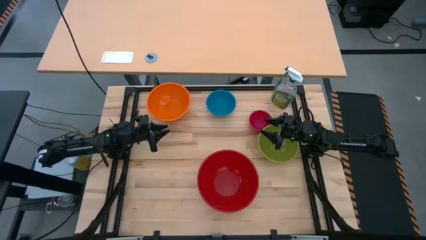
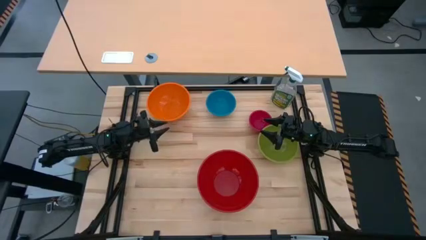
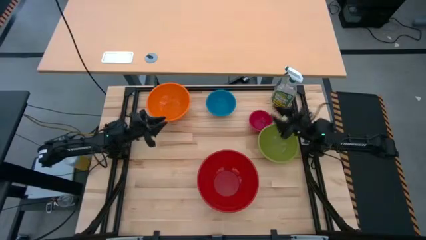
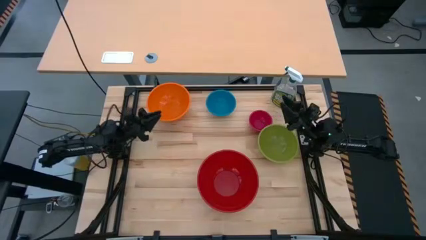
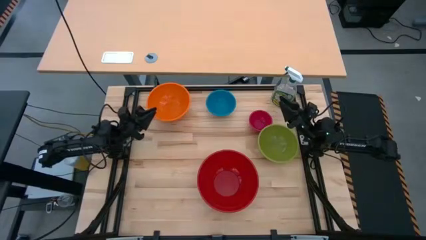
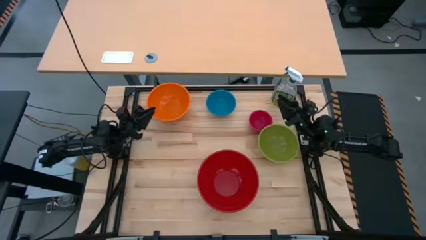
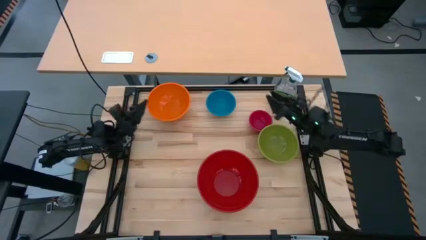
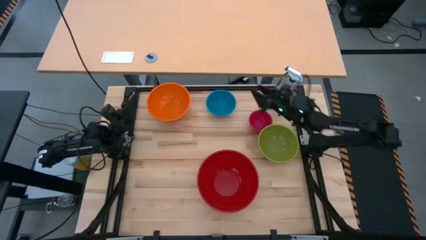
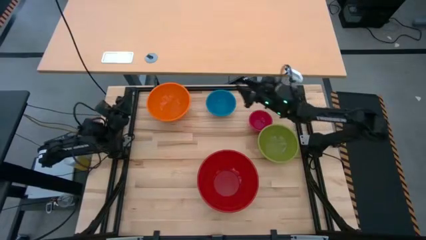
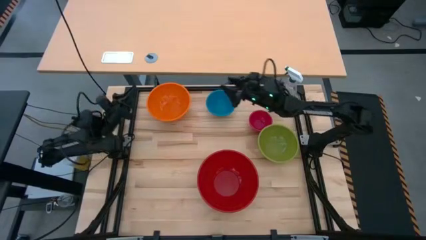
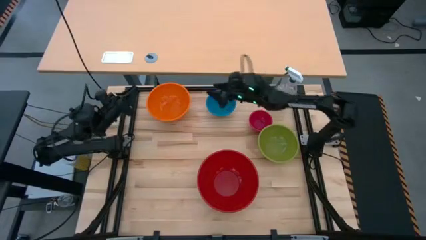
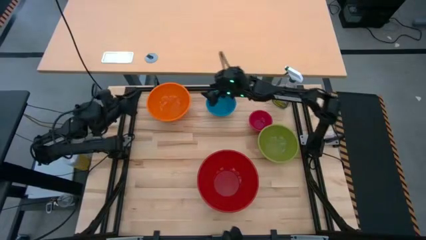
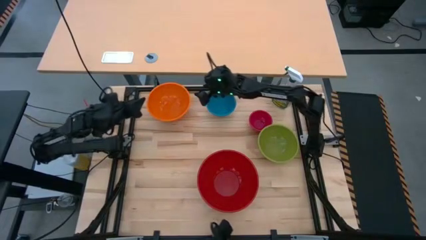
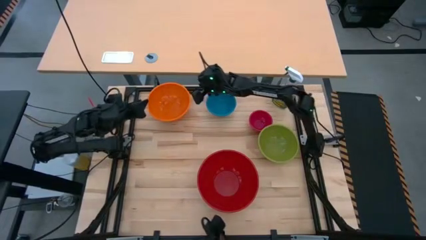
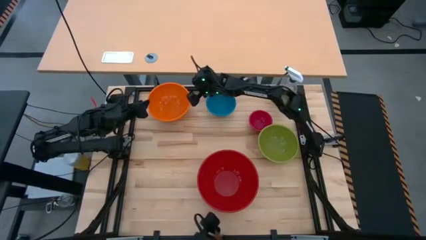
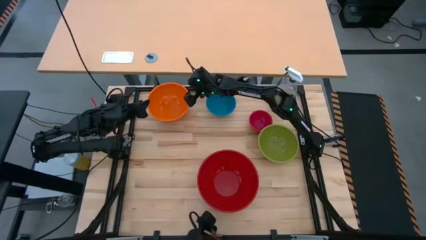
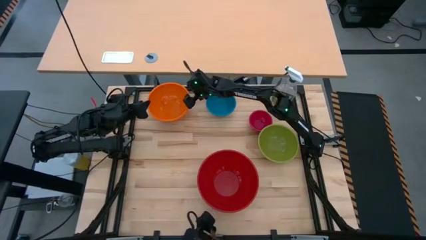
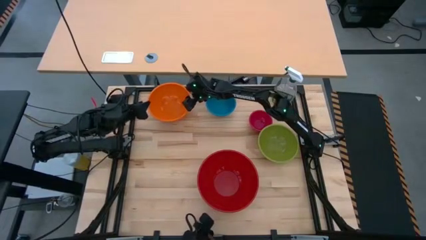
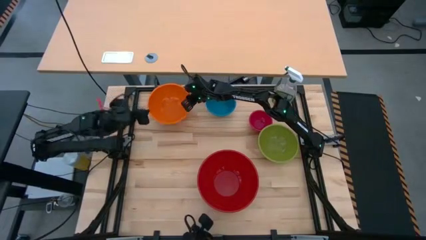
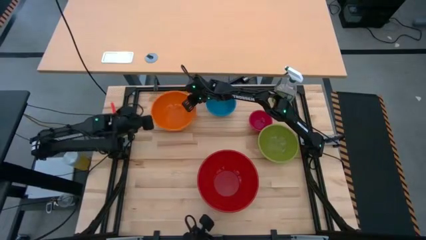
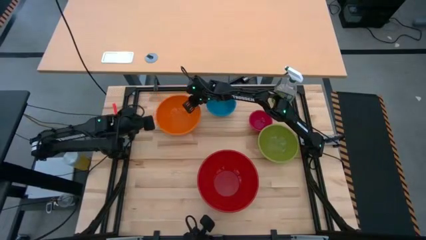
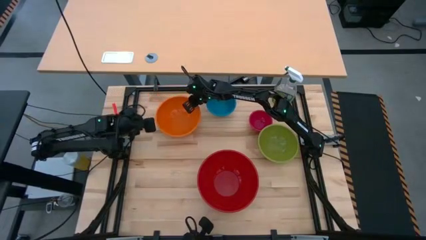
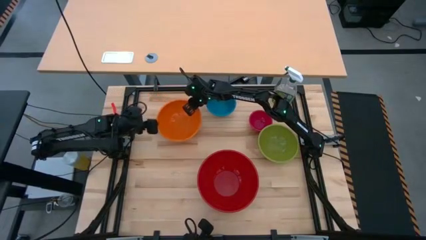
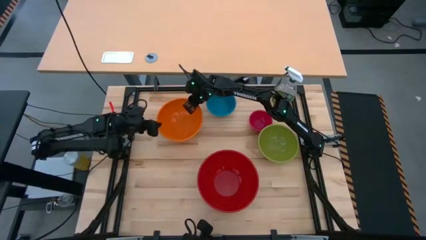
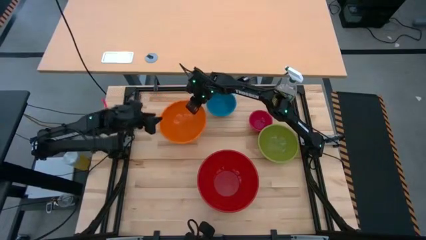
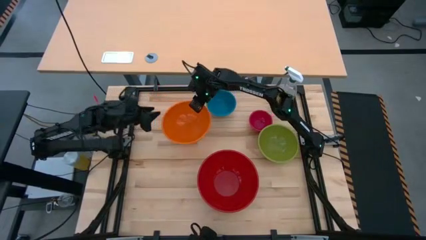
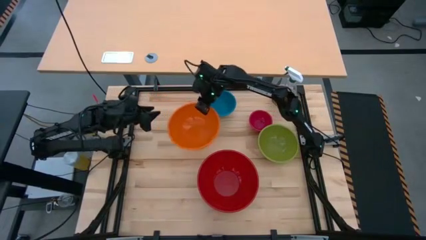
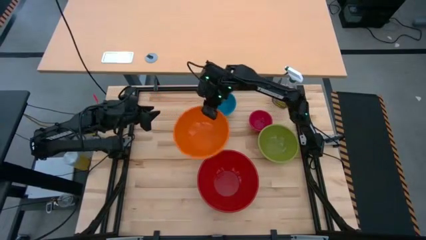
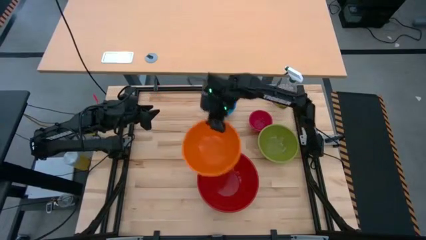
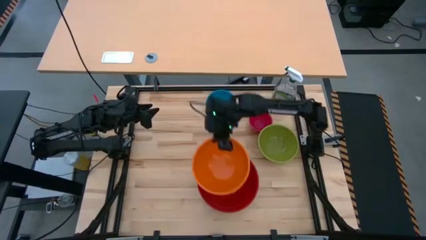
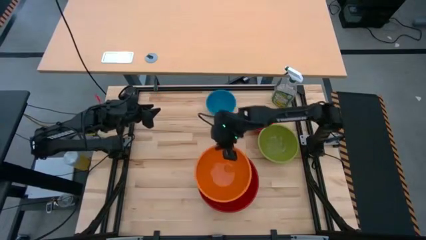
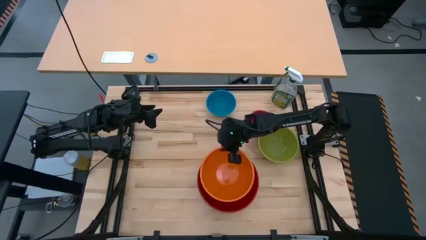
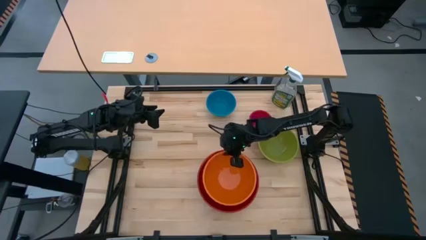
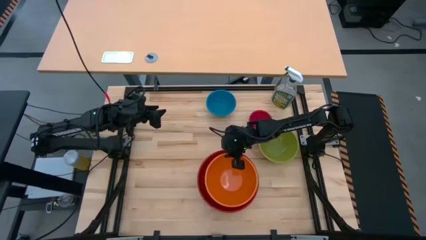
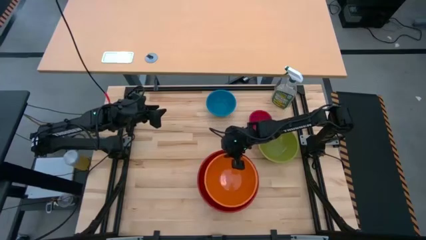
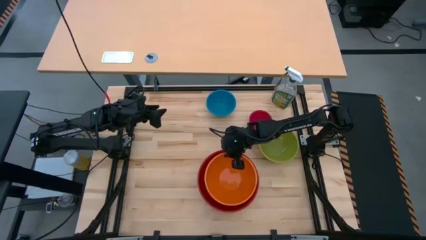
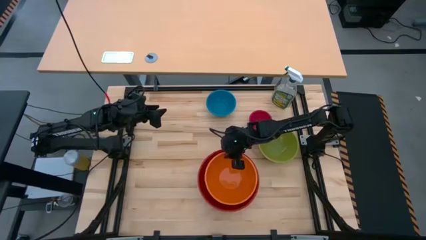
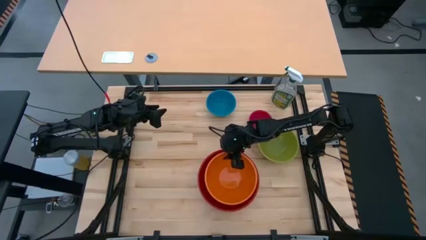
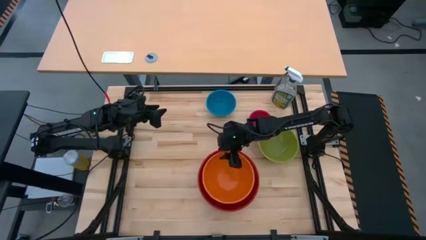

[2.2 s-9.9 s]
Stack the orange bowl on the red bowl

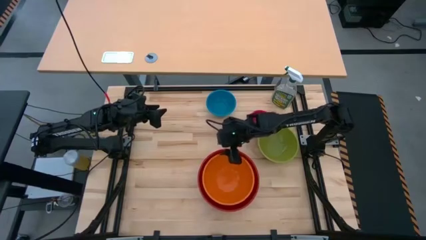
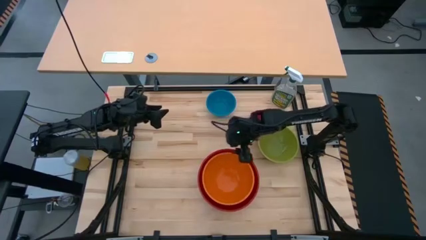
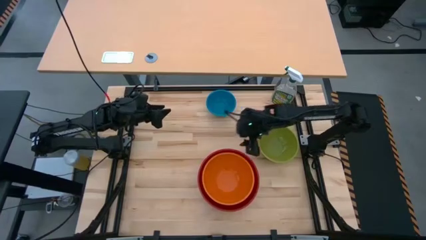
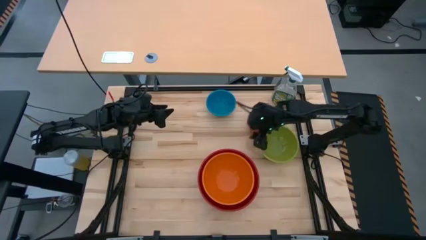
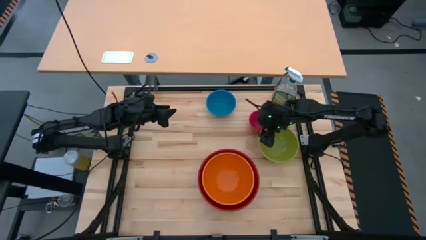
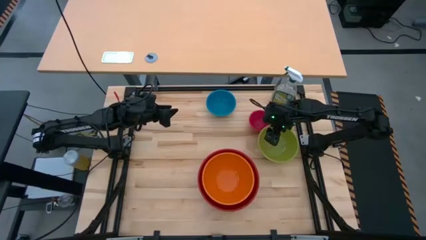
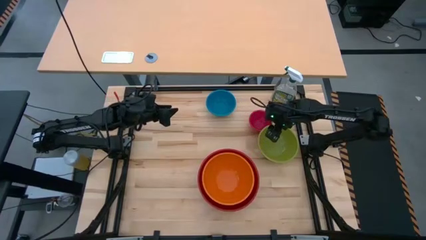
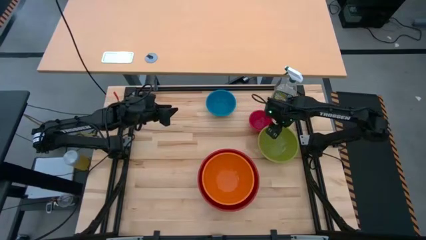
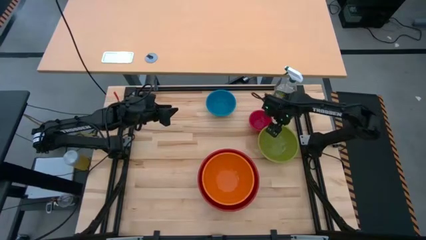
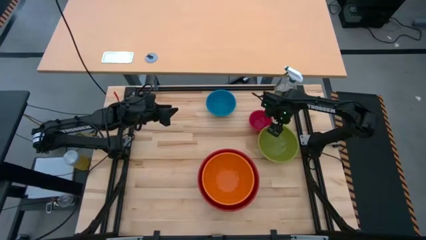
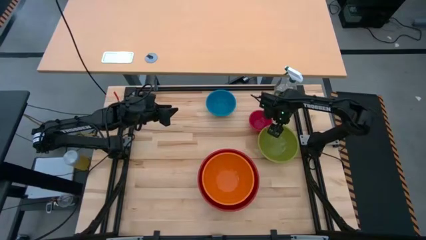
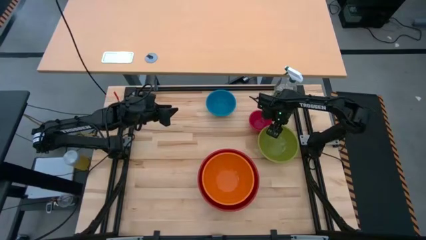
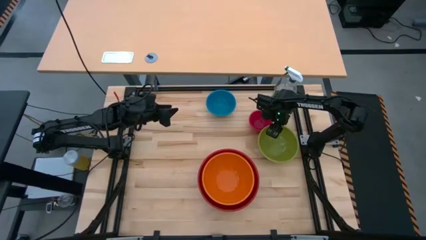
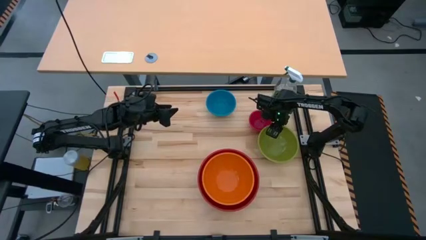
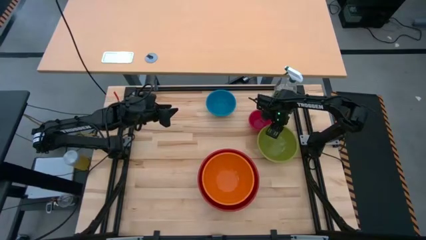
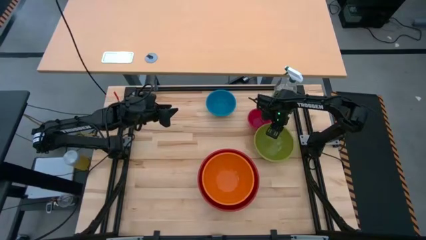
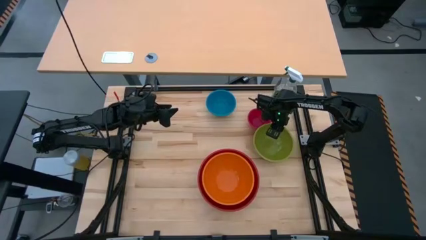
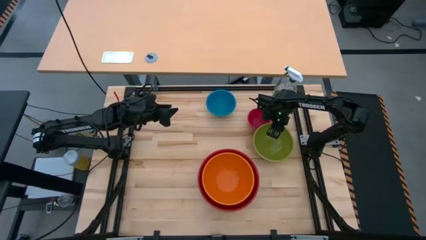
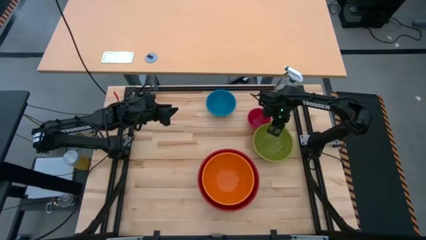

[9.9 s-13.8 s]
Stack the green bowl on the orange bowl

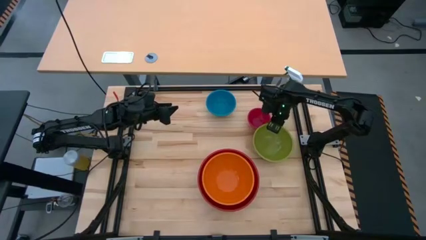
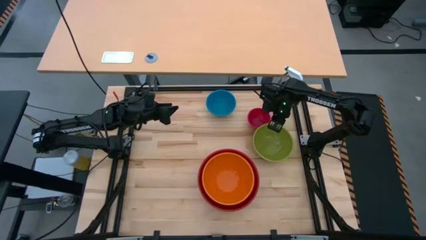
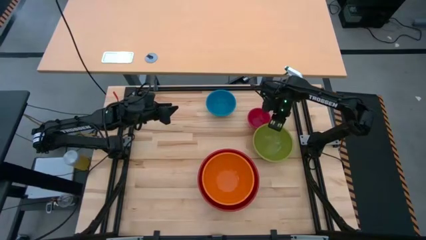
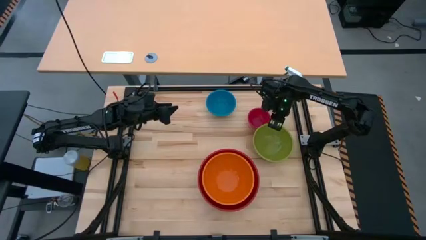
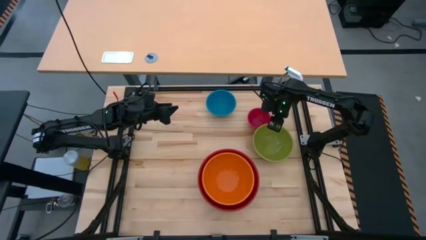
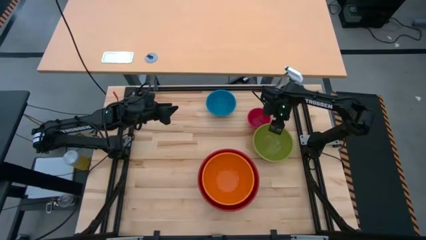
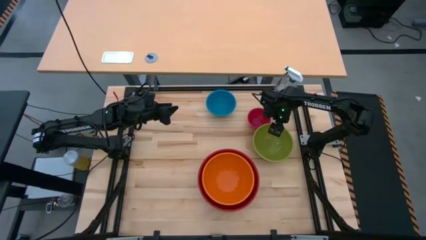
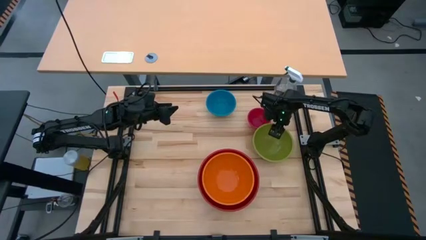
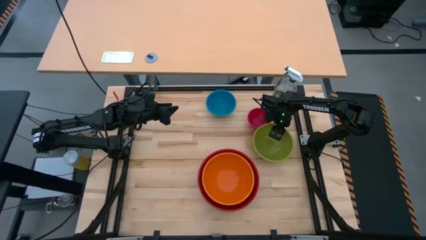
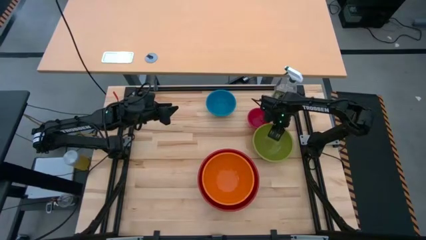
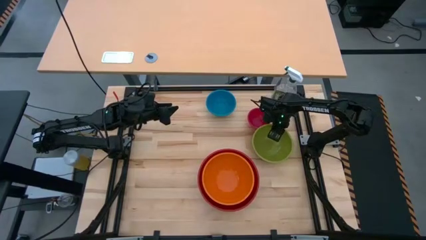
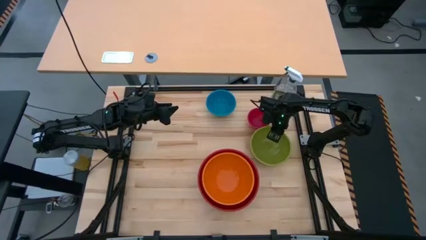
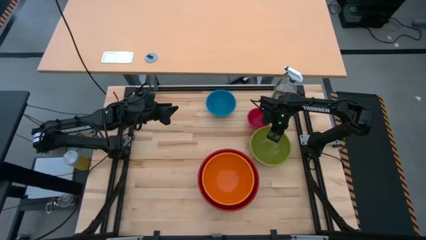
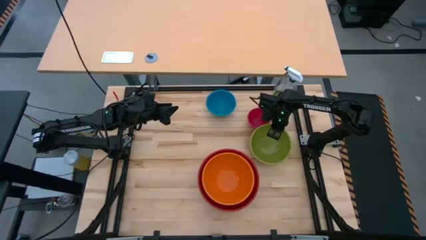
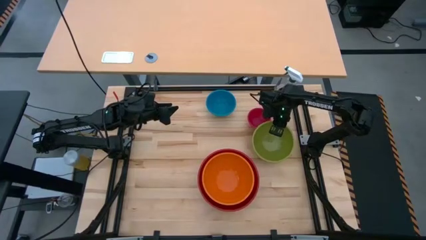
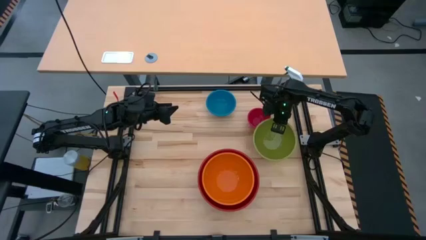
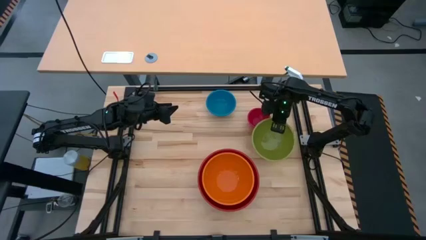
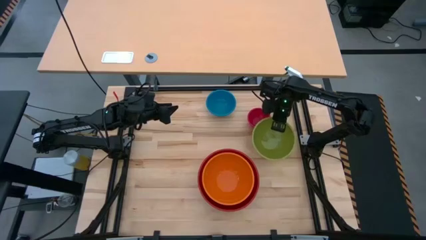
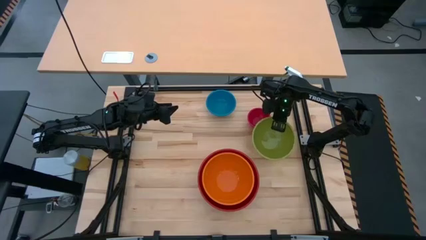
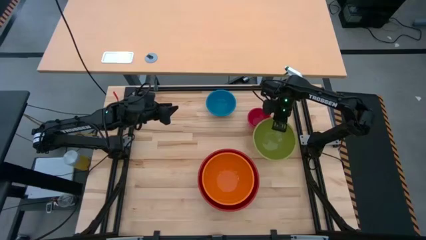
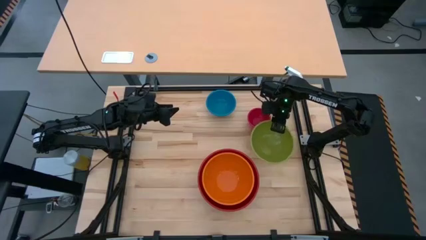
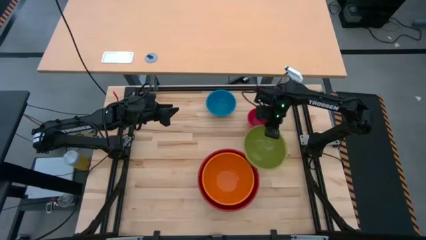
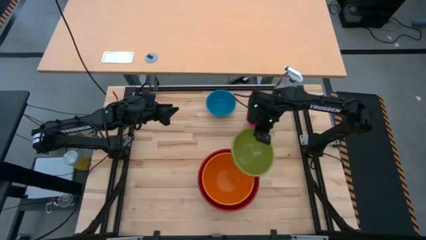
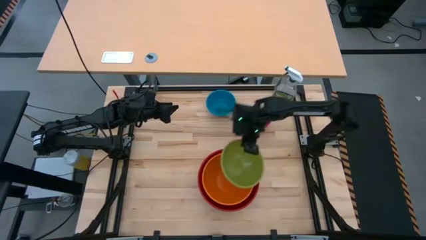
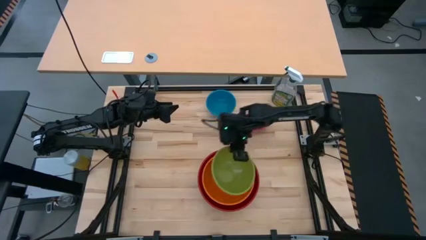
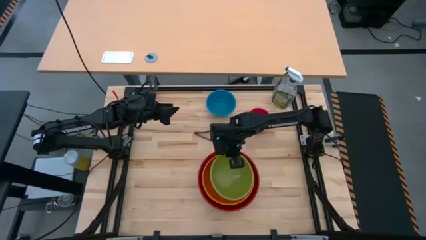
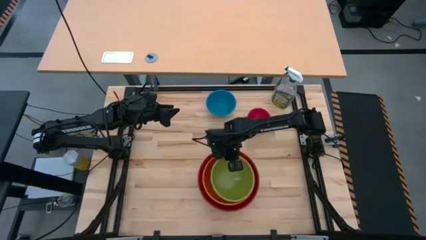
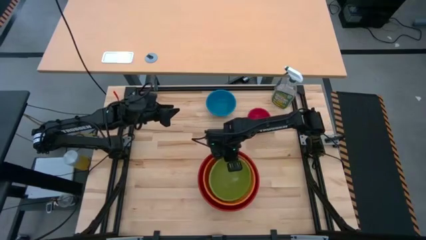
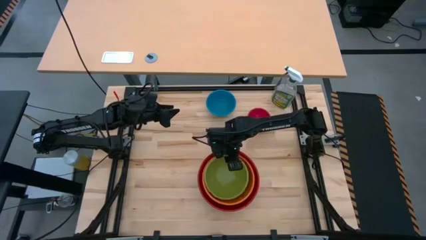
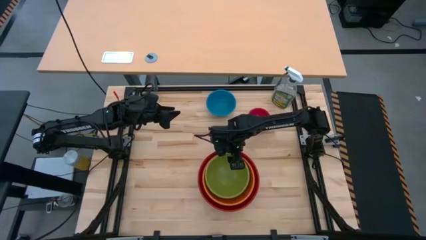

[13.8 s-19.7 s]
Stack the green bowl on the orange bowl
